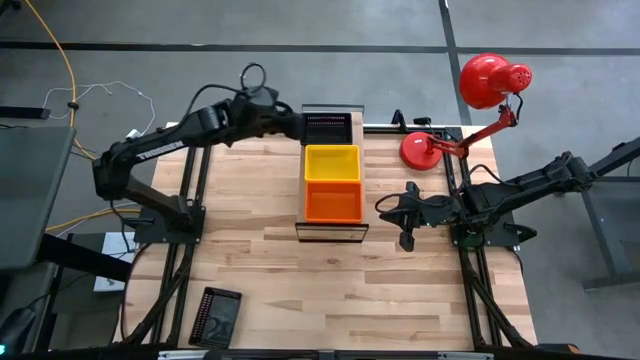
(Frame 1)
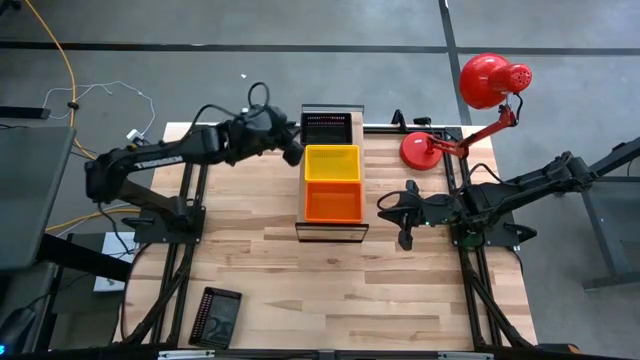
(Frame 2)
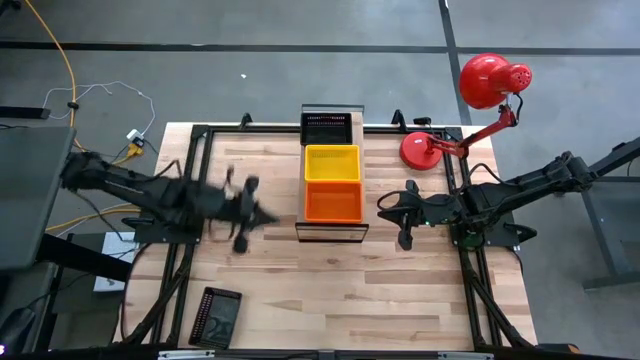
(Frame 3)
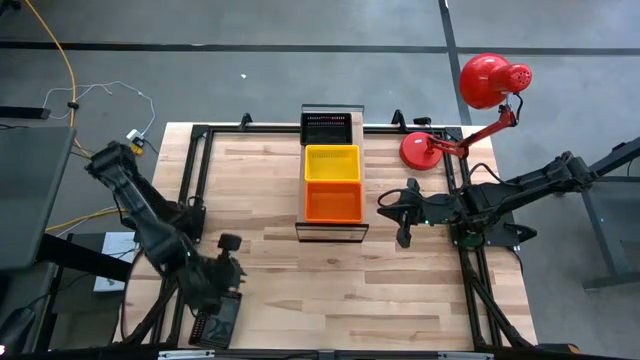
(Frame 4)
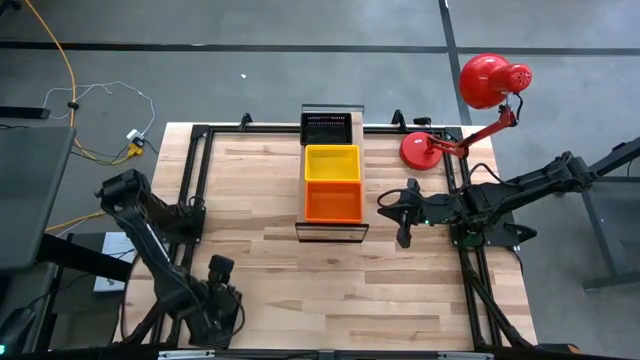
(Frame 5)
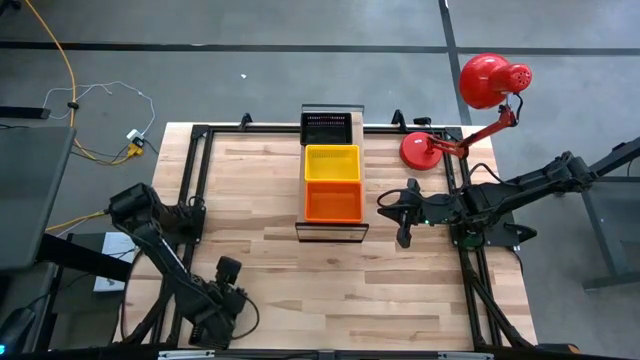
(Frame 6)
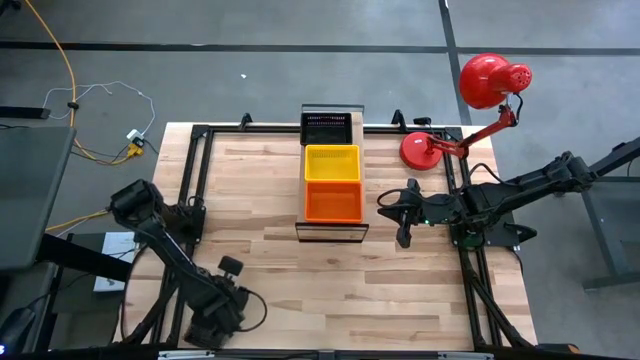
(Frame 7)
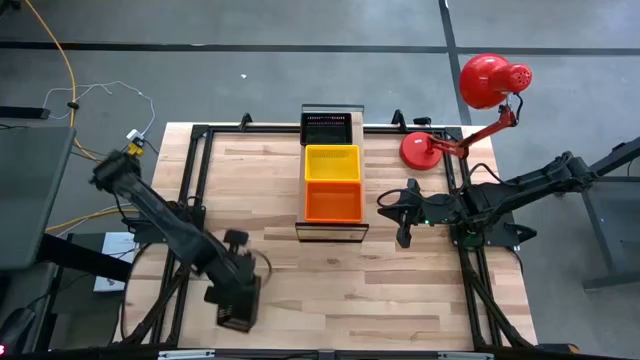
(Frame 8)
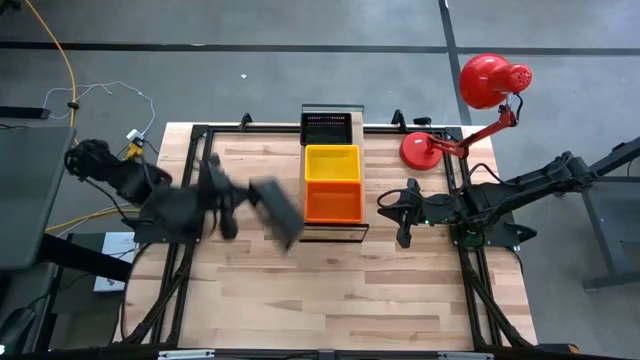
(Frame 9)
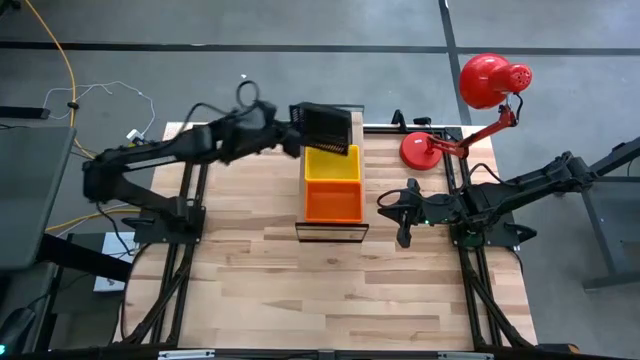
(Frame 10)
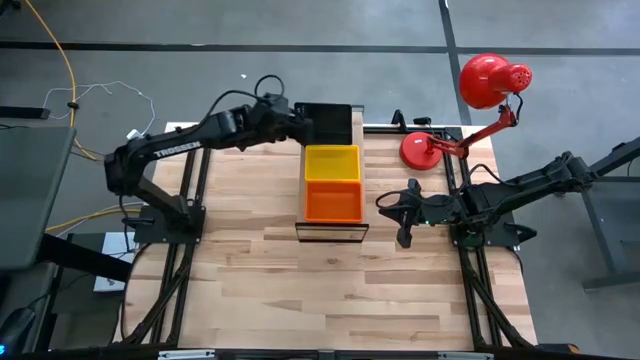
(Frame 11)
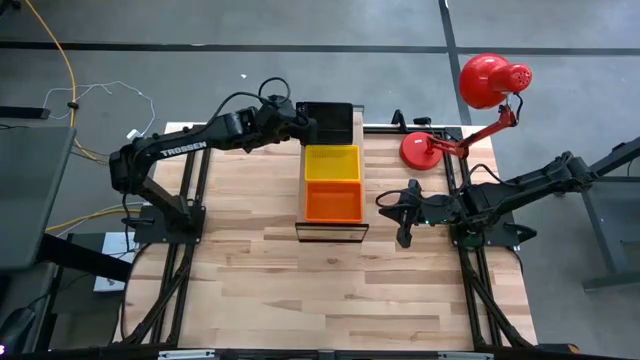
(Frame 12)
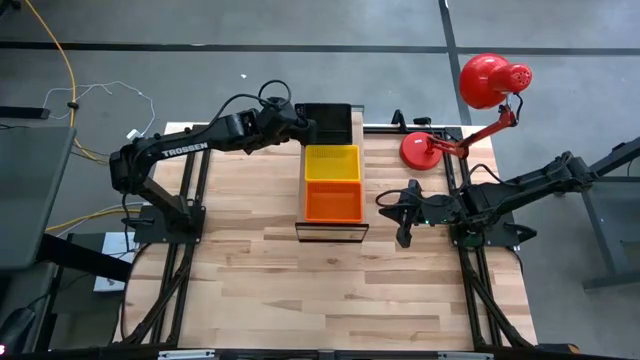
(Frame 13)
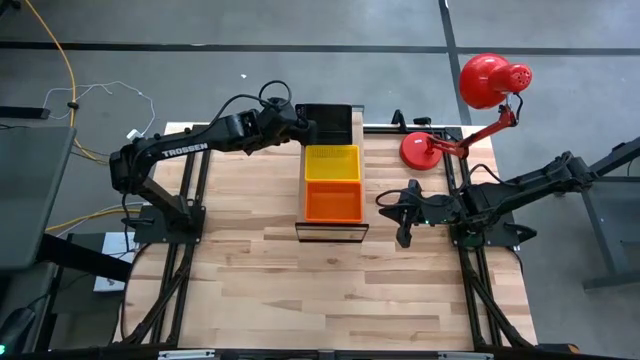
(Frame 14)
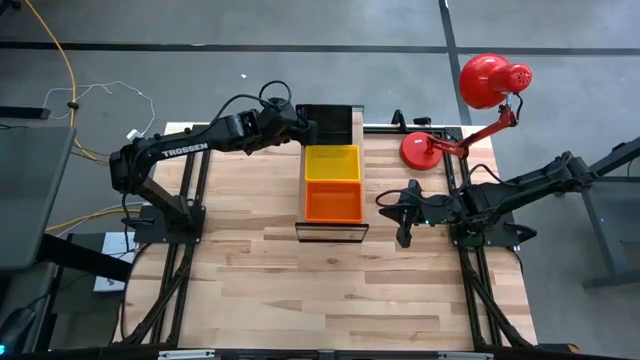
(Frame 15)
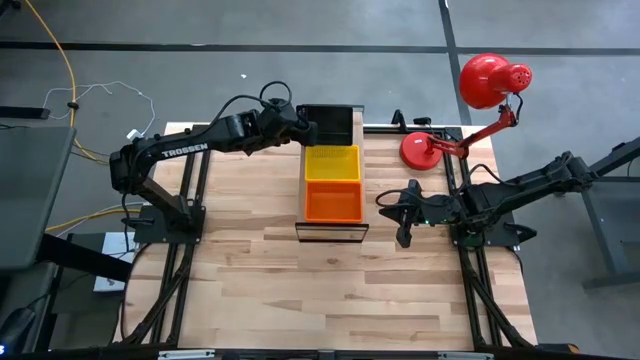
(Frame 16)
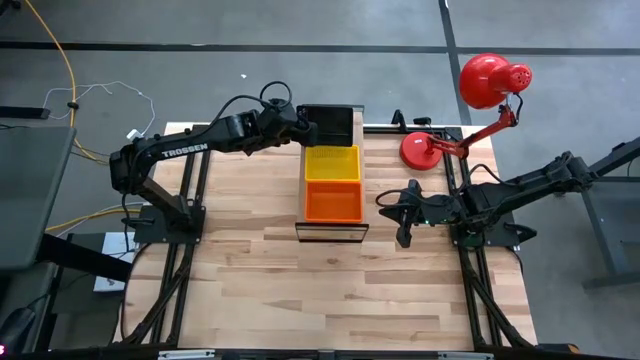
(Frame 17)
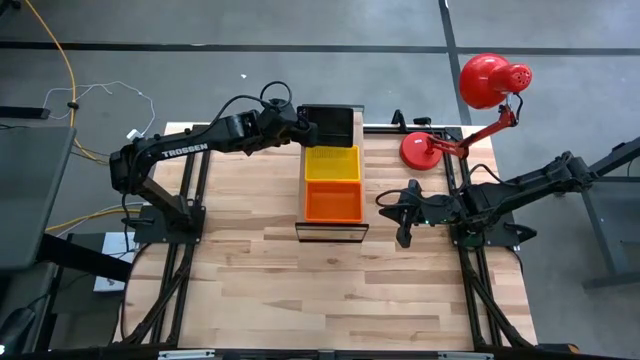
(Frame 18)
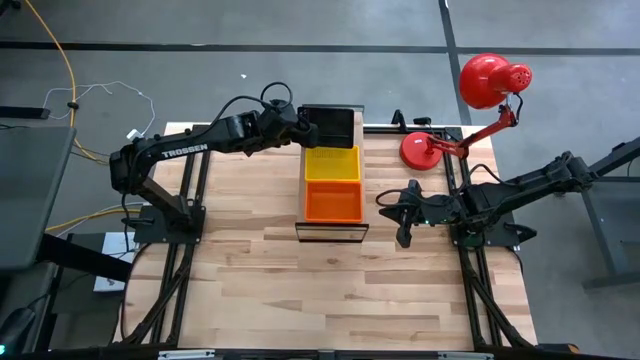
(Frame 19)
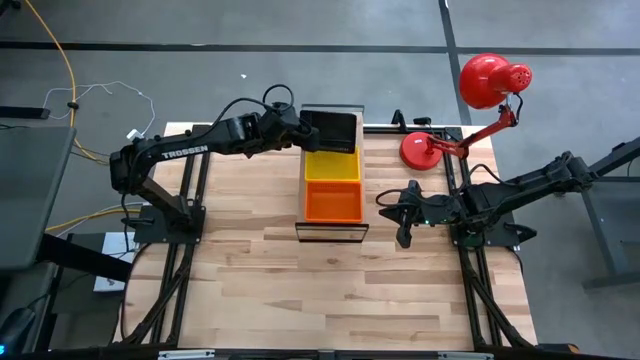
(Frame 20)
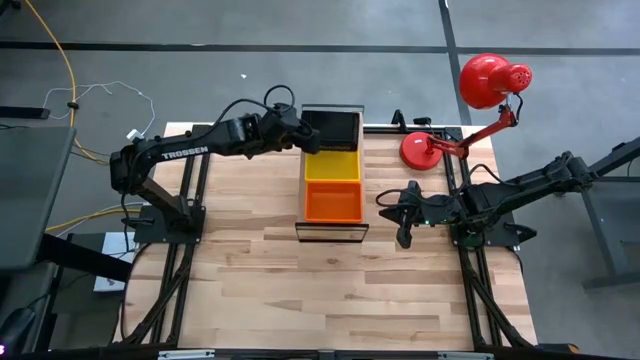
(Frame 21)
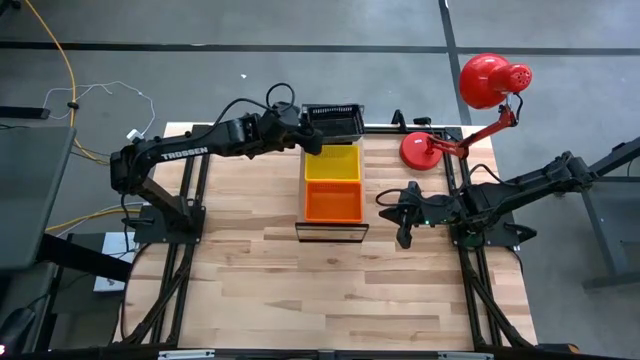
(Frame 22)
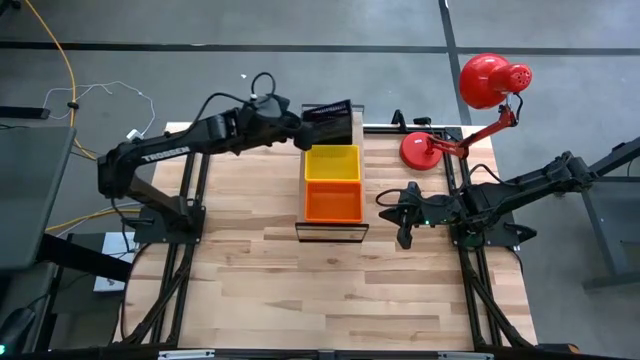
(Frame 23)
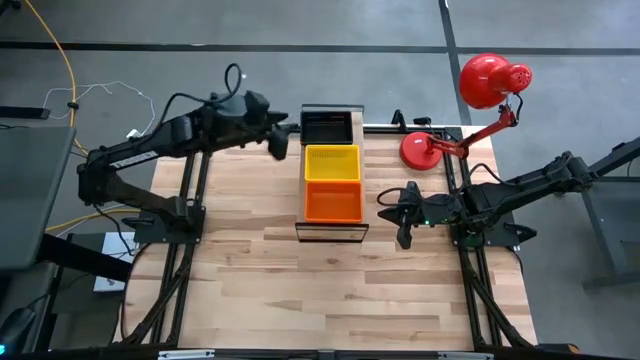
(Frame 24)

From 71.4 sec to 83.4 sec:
Task: Stack baskets on shelf by color
Stack the black bin on the black bins on the shelf

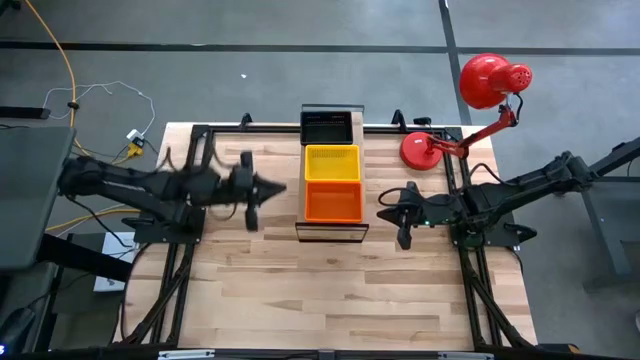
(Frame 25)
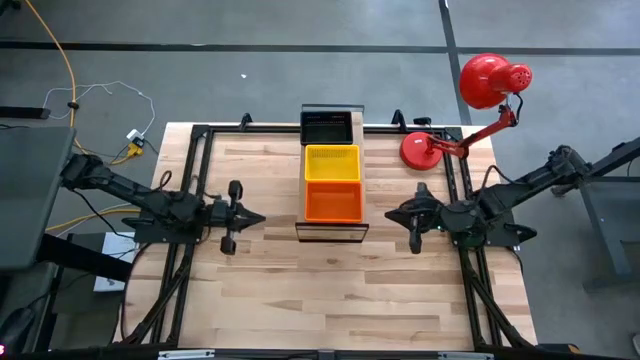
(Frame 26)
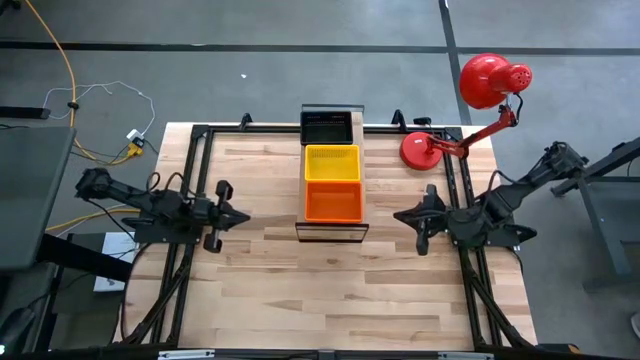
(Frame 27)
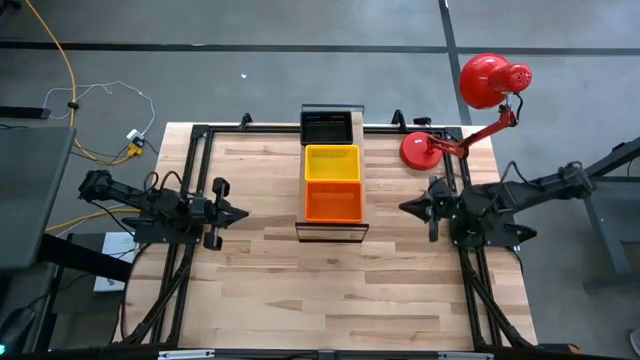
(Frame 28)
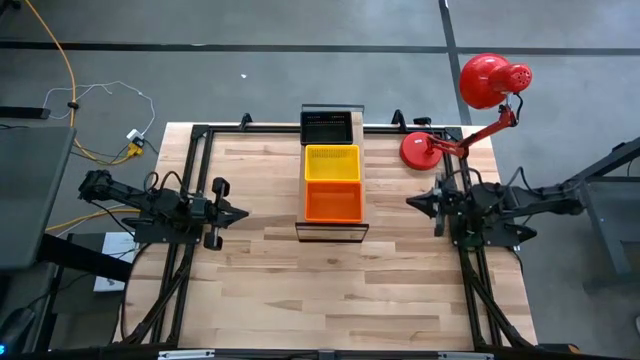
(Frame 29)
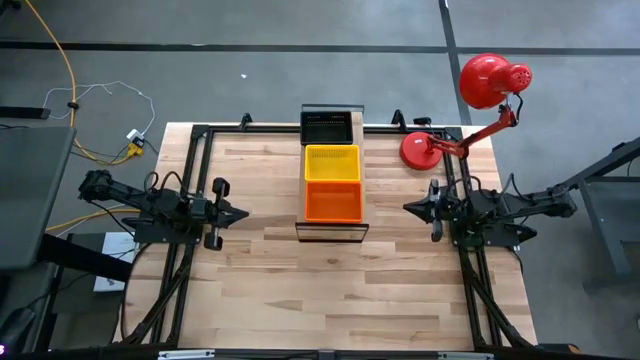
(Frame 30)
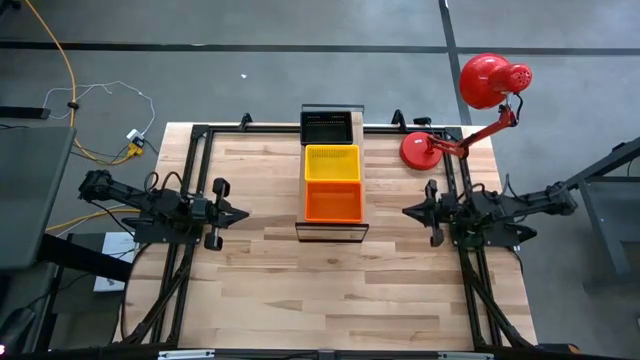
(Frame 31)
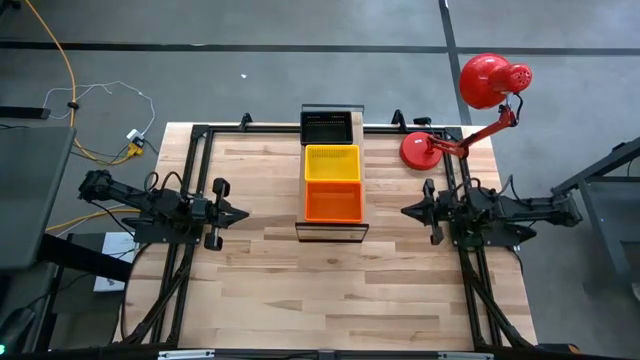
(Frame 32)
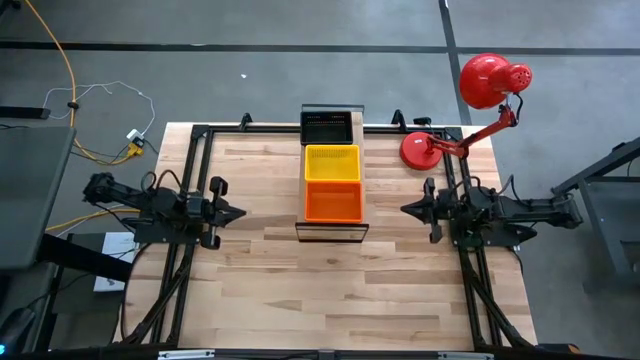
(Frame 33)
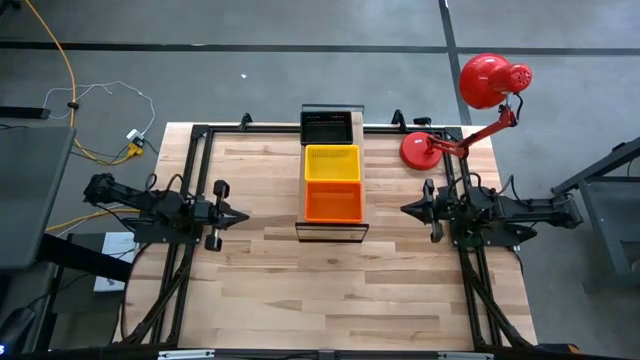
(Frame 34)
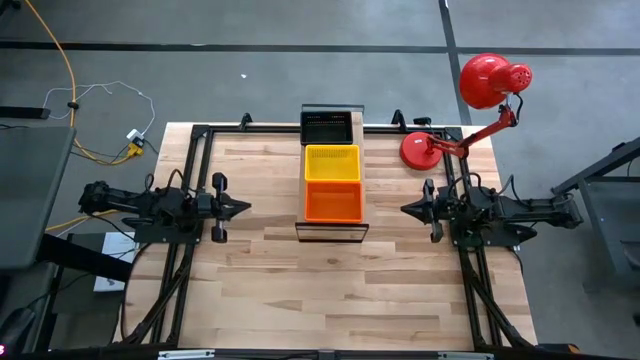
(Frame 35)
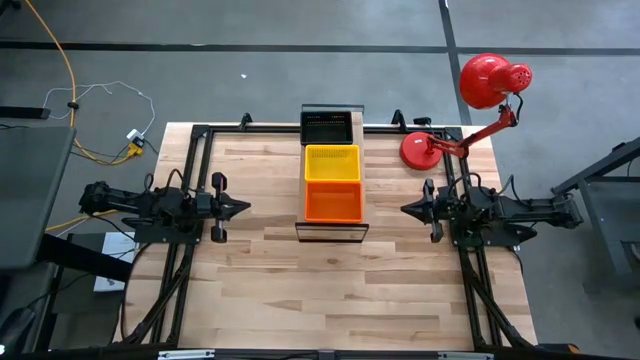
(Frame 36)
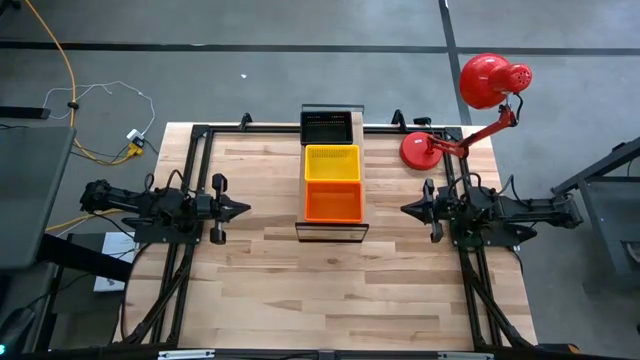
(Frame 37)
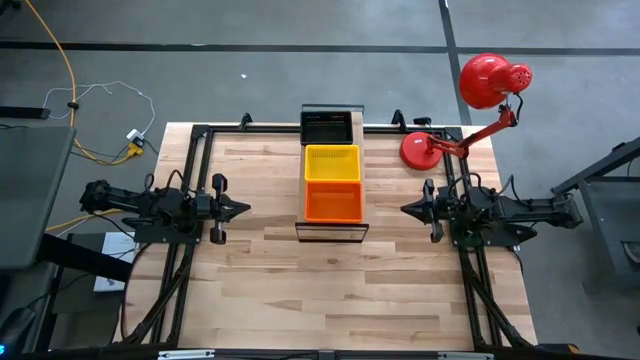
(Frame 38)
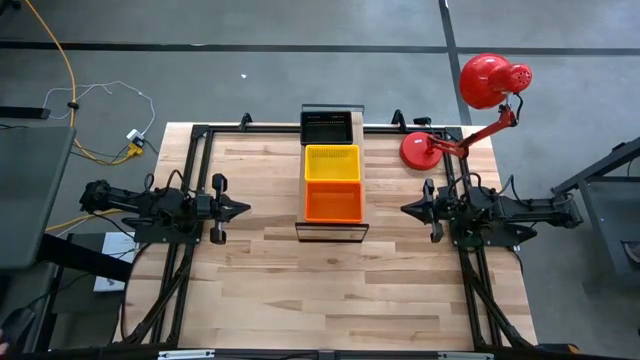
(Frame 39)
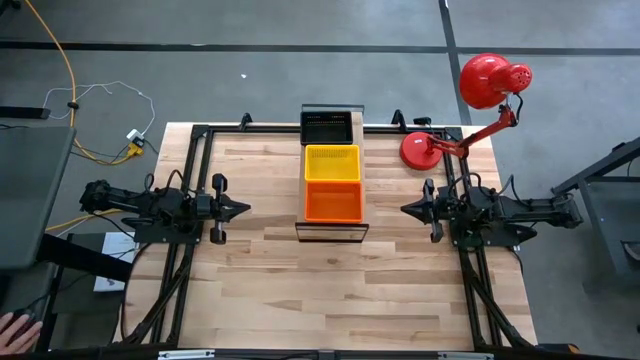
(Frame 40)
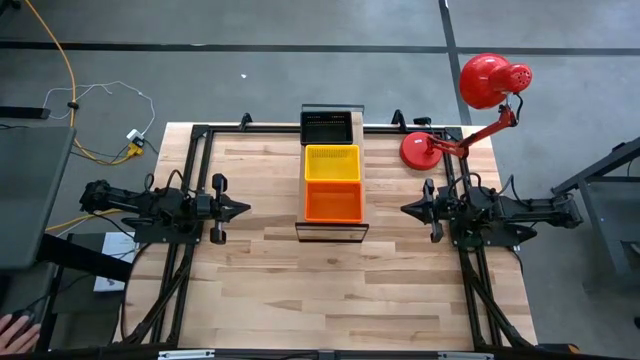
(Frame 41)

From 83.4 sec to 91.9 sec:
Return to Home Position

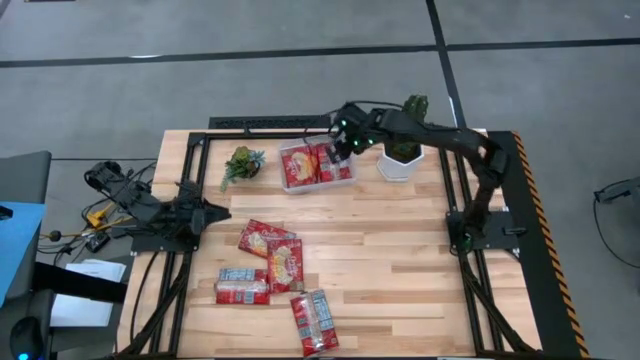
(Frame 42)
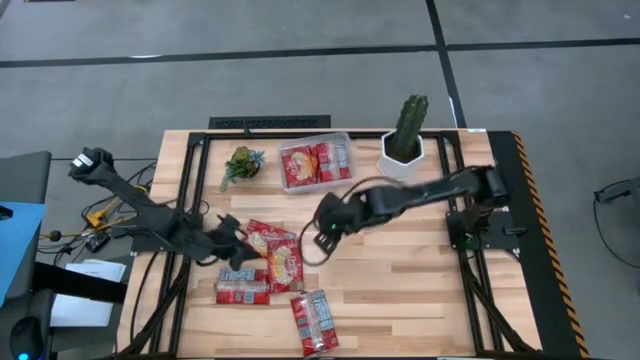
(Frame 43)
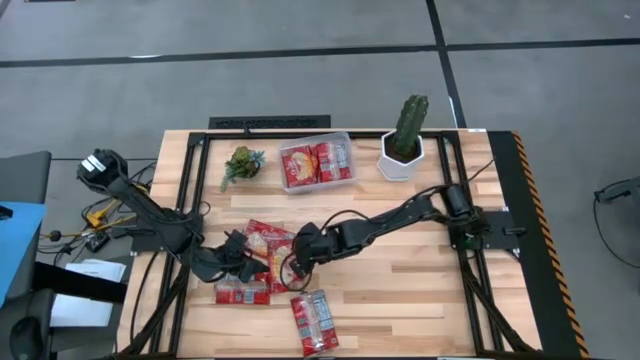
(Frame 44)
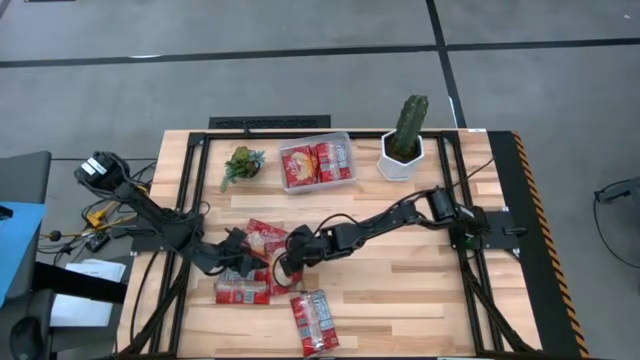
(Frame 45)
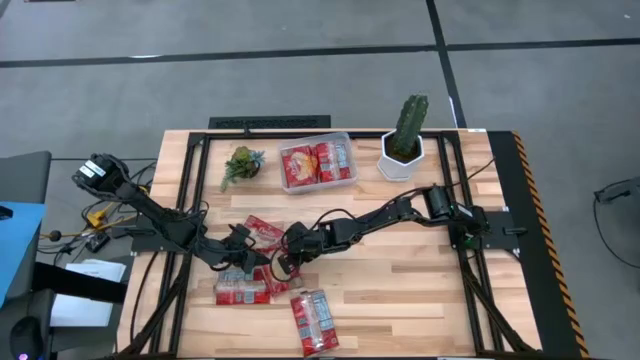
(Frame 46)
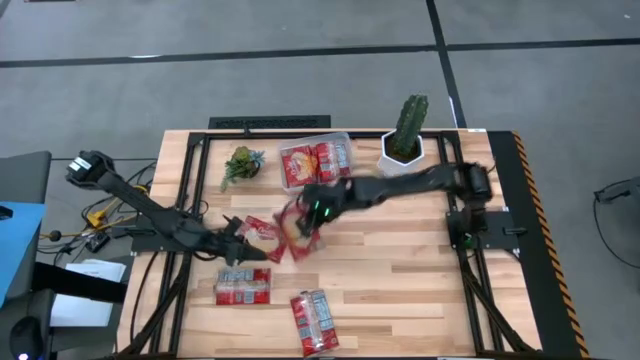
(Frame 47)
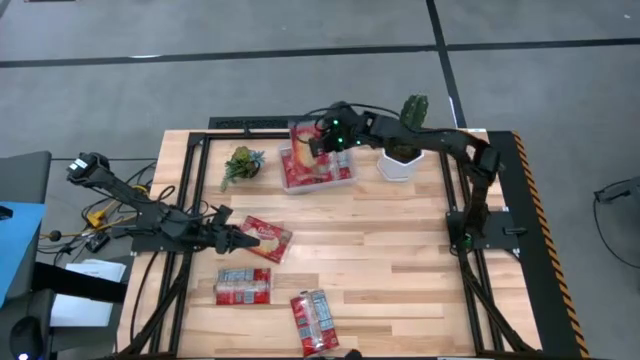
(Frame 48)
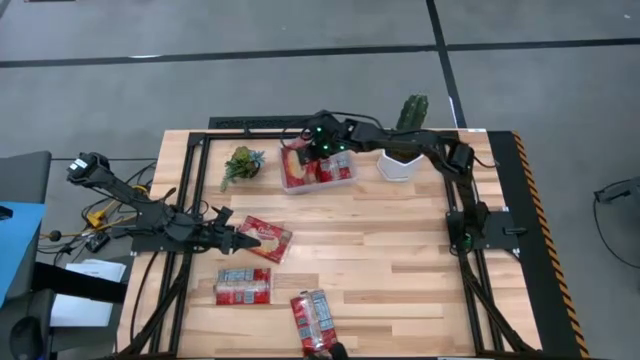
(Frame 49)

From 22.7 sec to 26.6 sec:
Task: Sort popcorn bags into baskets
Put the red popcorn bag into the transparent bin
